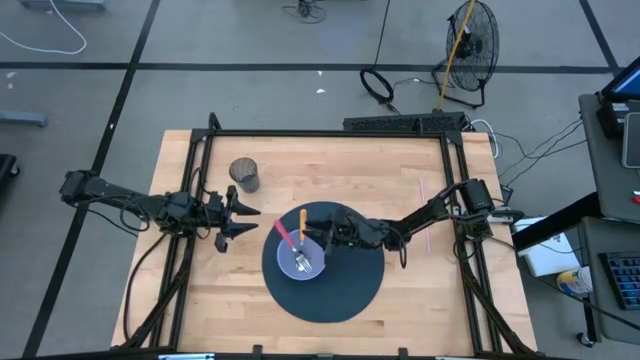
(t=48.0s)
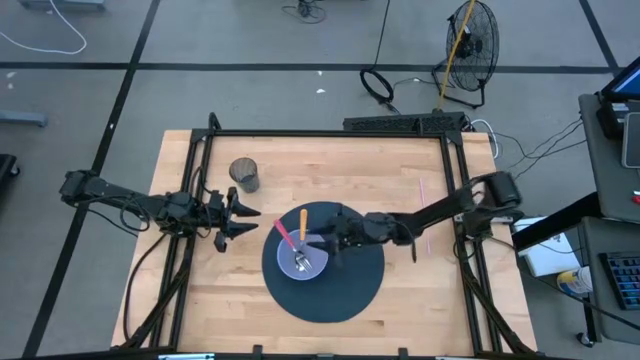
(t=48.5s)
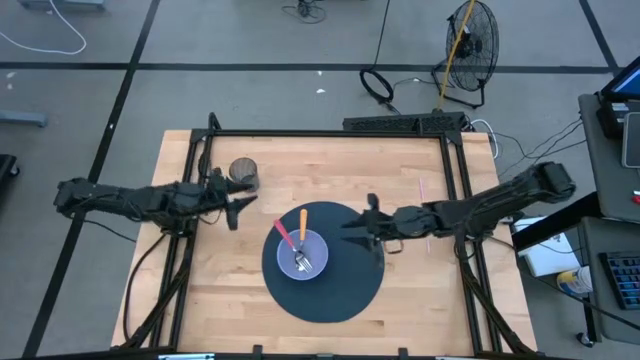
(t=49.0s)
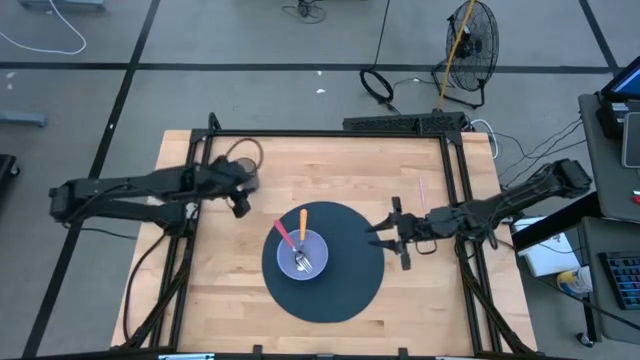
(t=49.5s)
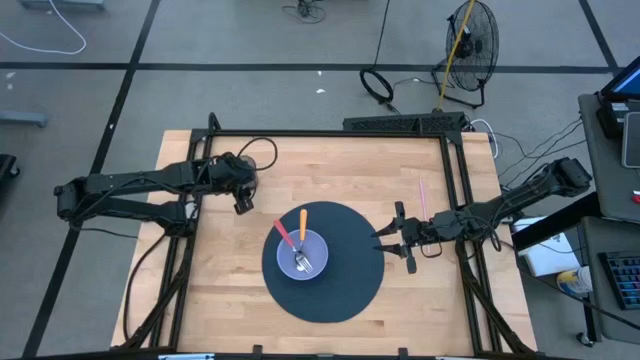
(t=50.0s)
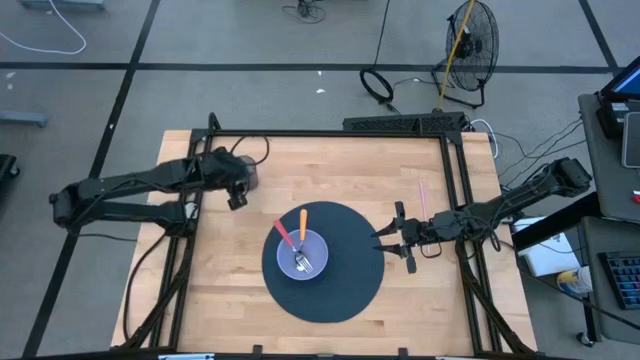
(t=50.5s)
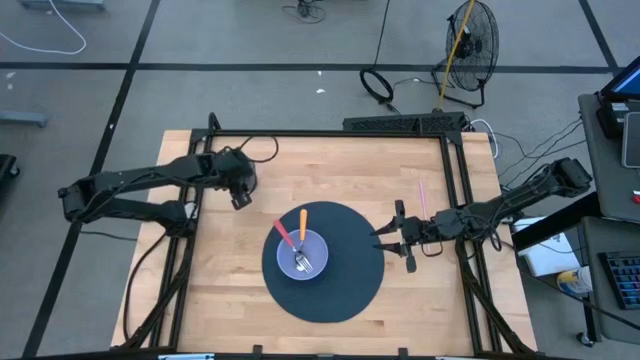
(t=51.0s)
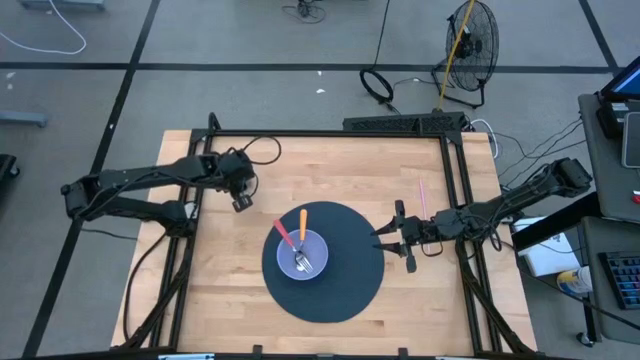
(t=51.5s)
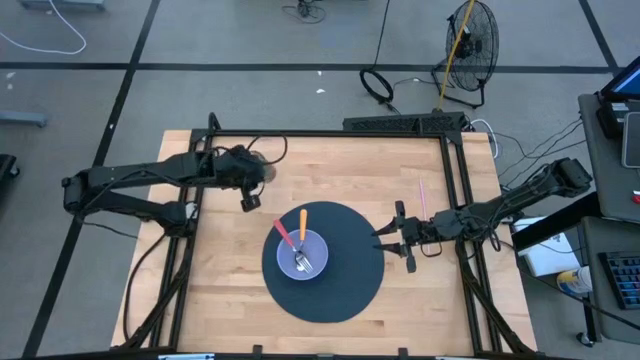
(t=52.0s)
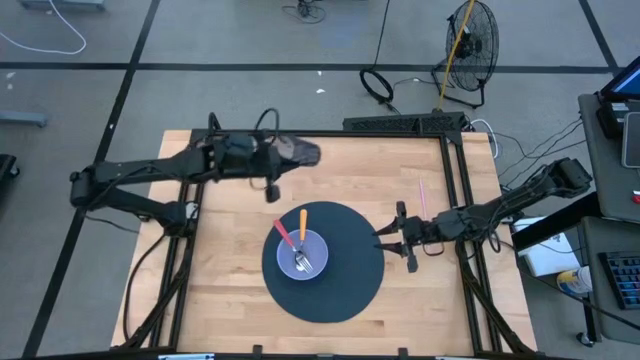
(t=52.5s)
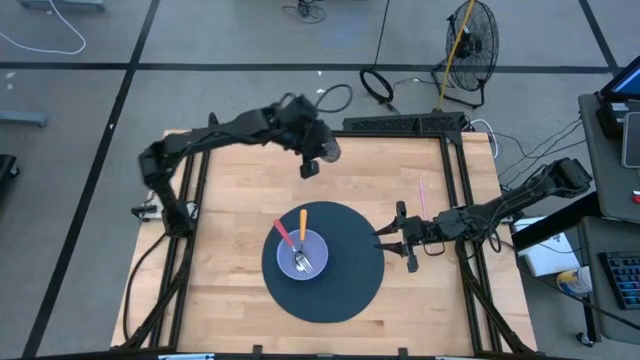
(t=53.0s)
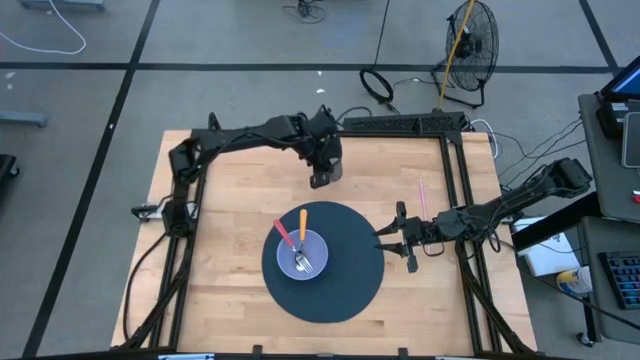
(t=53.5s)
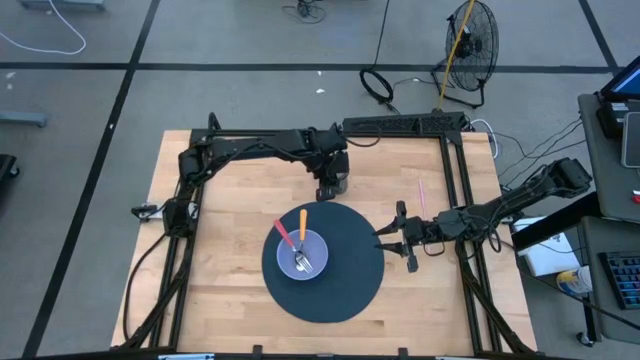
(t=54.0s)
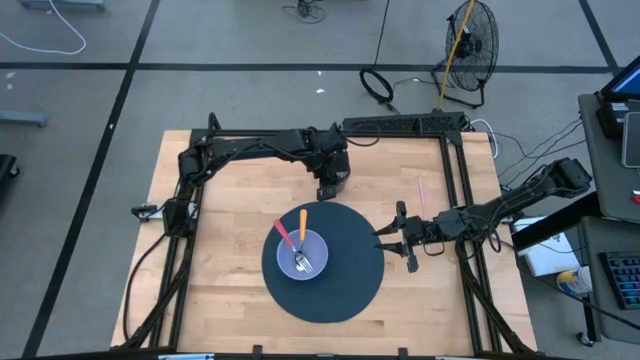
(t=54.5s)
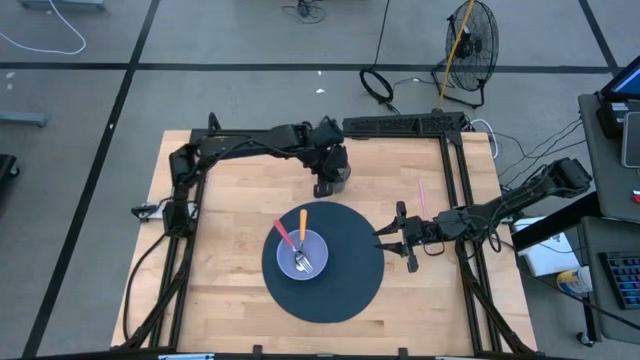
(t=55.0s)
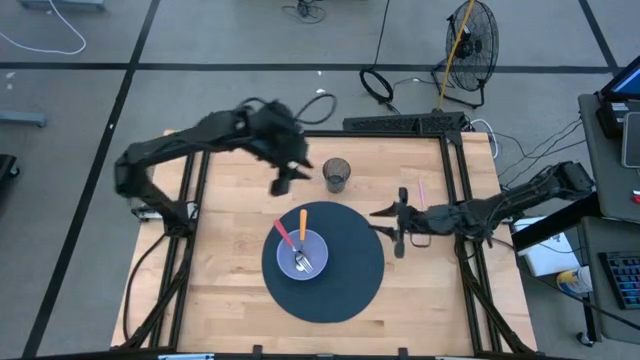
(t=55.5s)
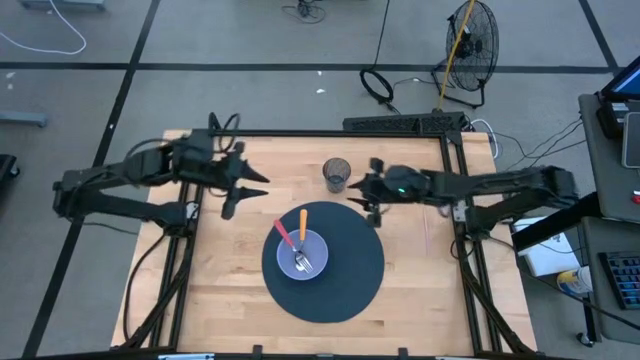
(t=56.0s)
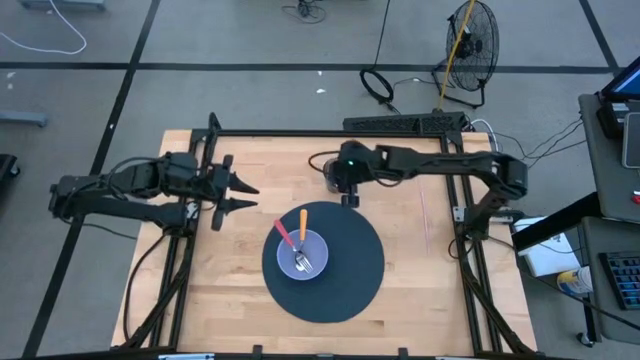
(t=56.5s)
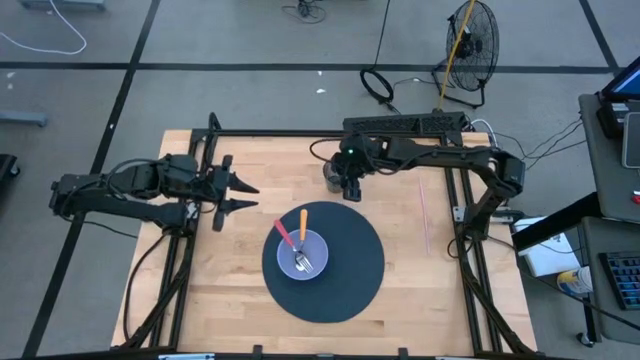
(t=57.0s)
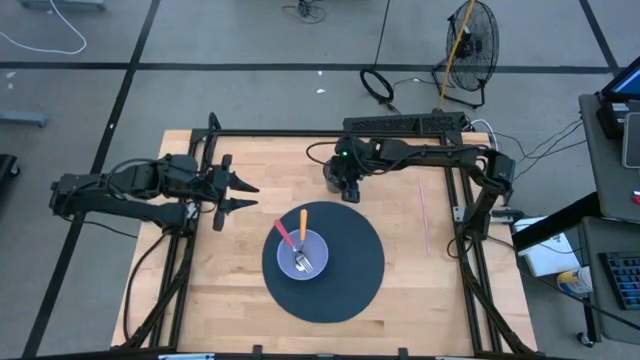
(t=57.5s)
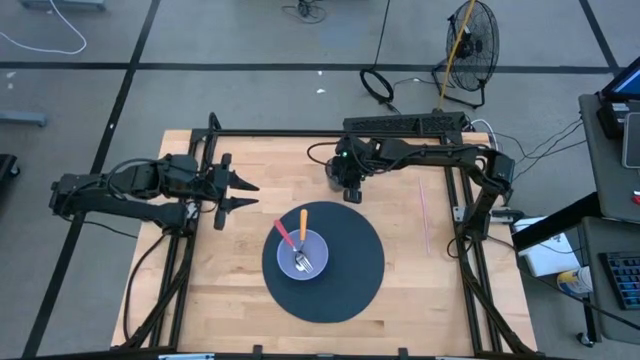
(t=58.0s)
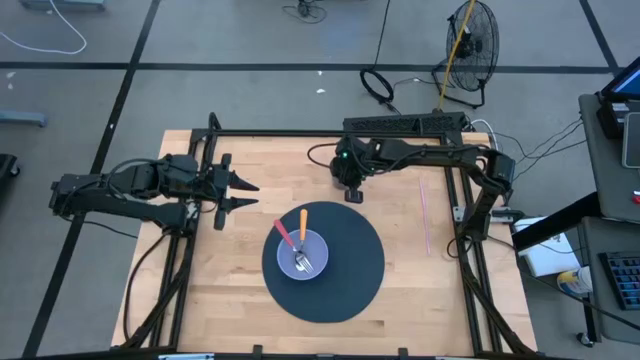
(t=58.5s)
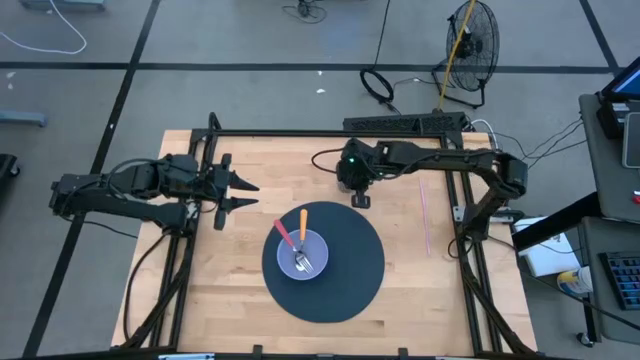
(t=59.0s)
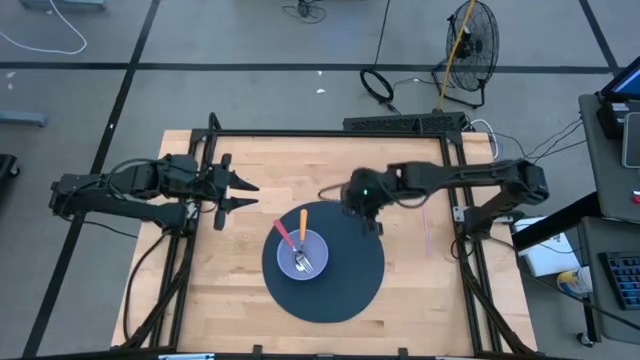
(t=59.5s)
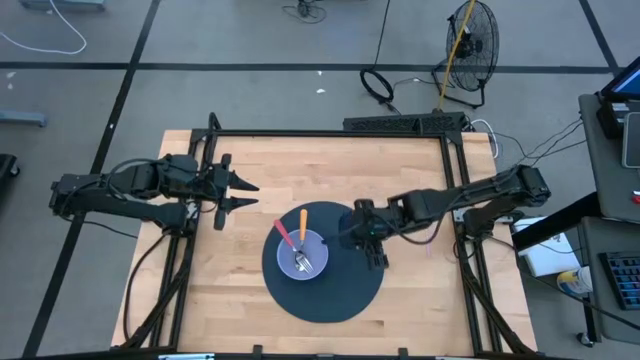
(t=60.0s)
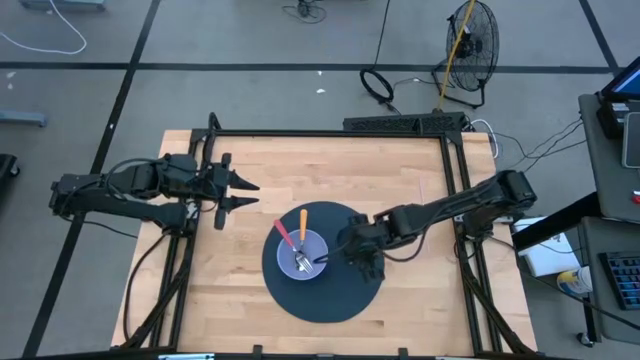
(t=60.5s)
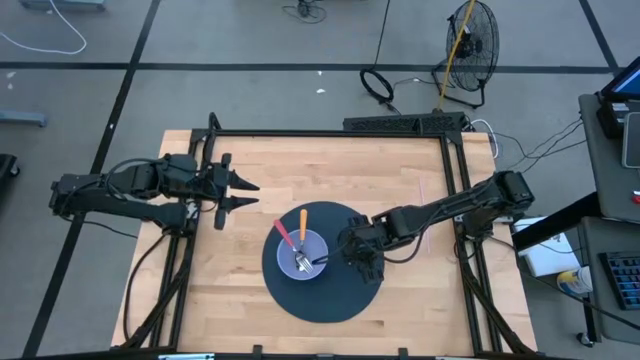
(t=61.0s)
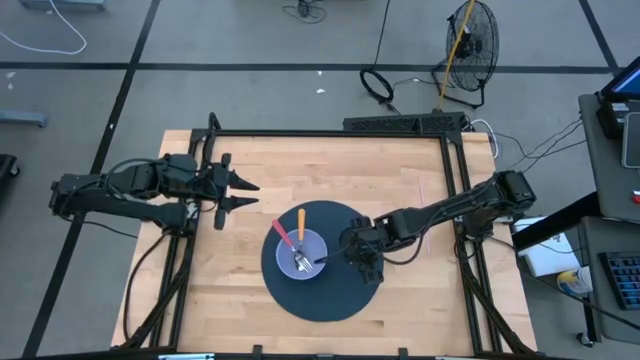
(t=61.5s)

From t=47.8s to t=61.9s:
Task: Pick & Place Utensil
Put the blue cup on the mat to the right of the purple bowl

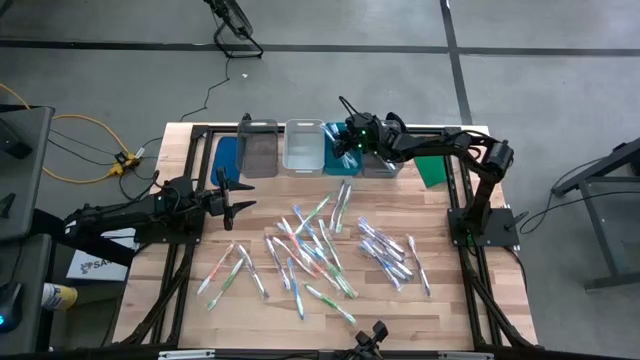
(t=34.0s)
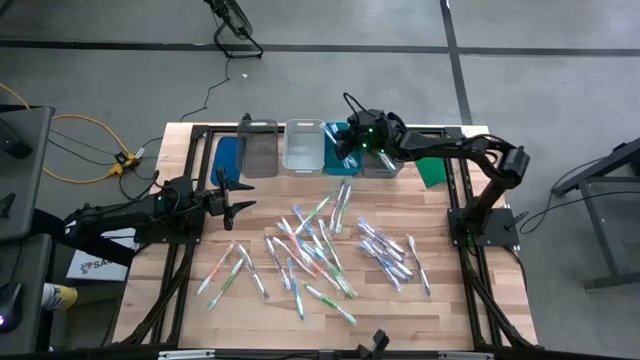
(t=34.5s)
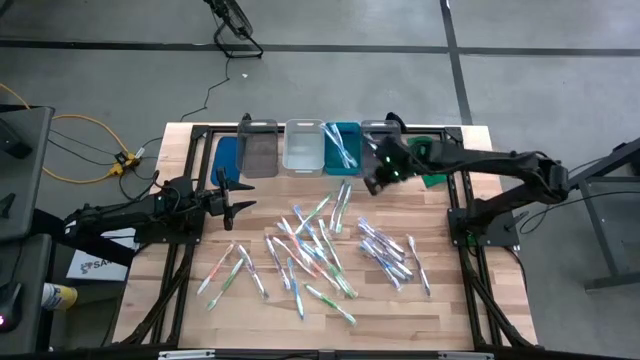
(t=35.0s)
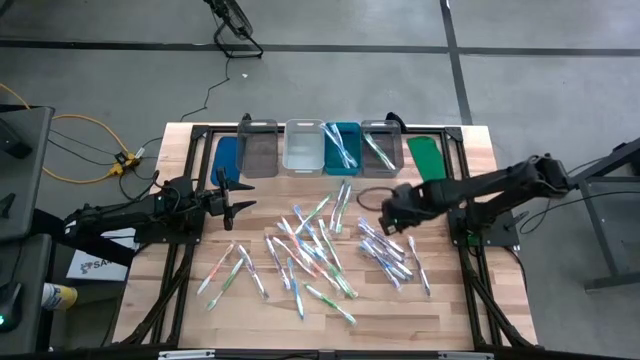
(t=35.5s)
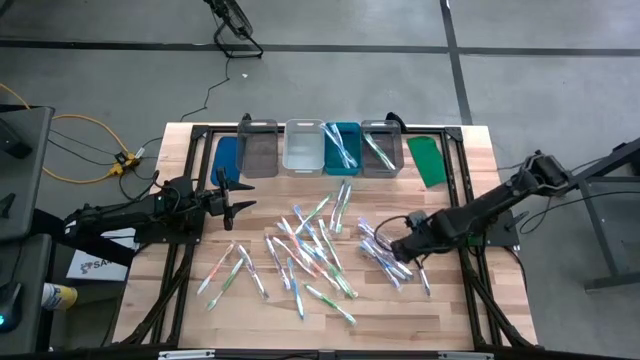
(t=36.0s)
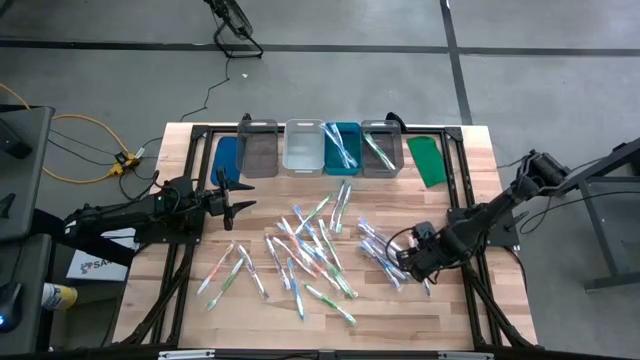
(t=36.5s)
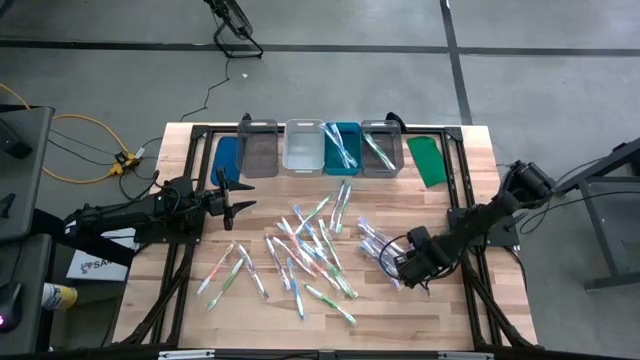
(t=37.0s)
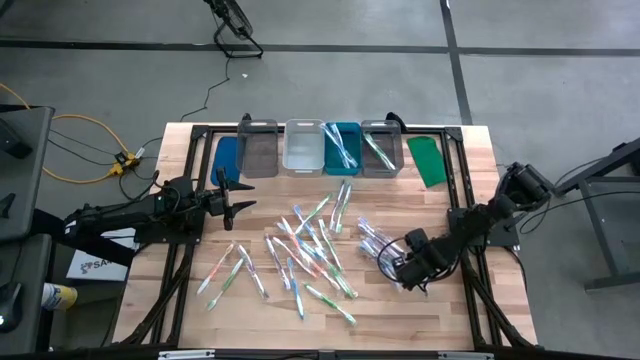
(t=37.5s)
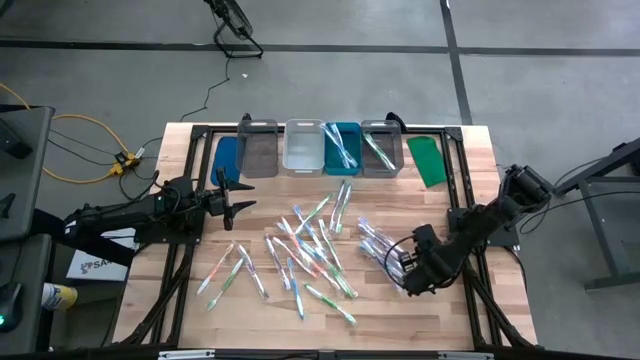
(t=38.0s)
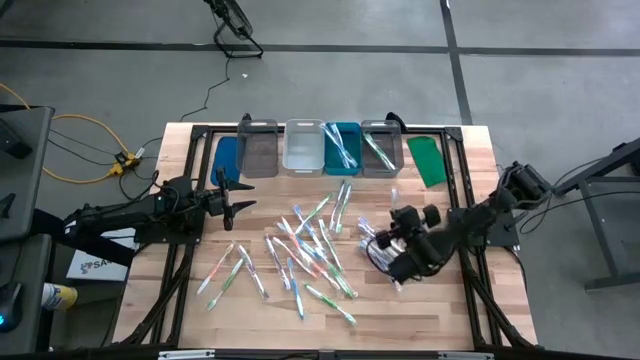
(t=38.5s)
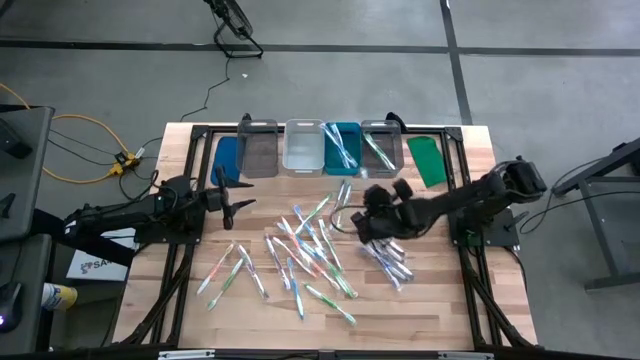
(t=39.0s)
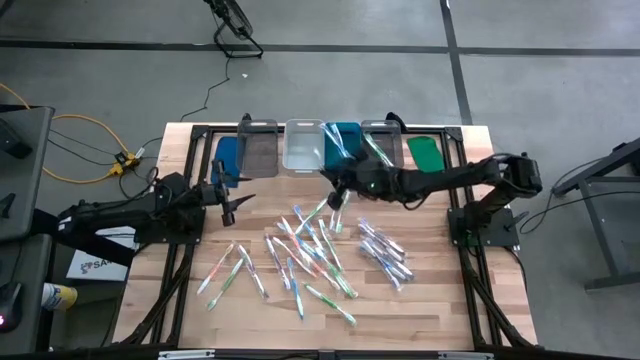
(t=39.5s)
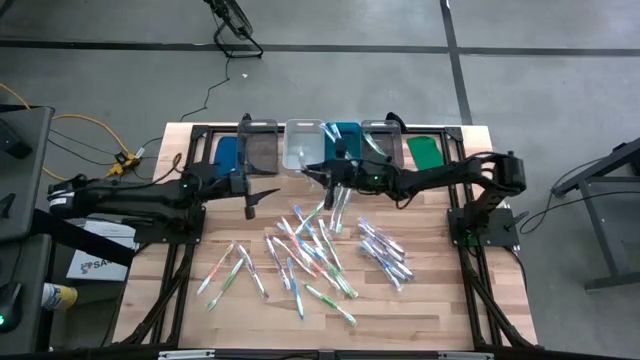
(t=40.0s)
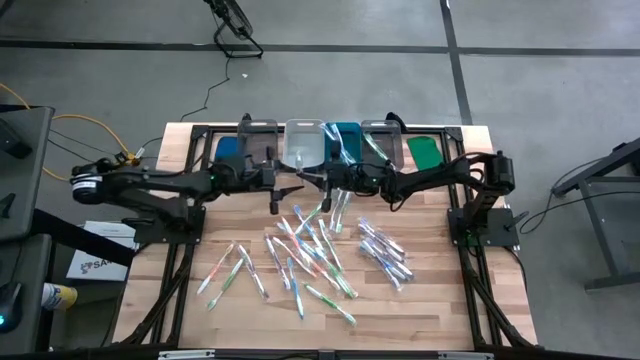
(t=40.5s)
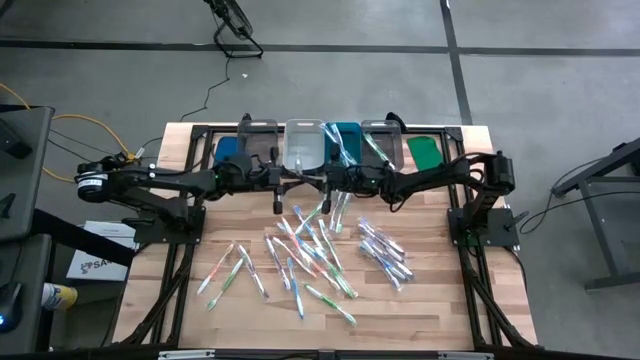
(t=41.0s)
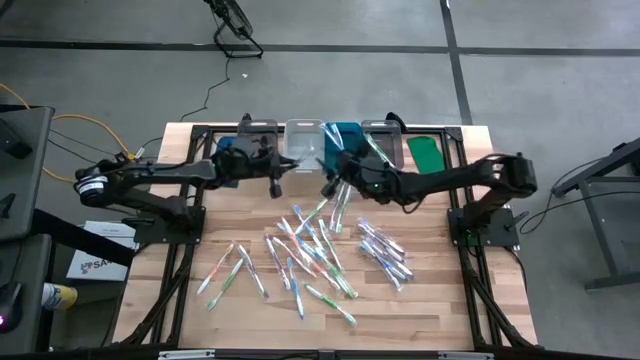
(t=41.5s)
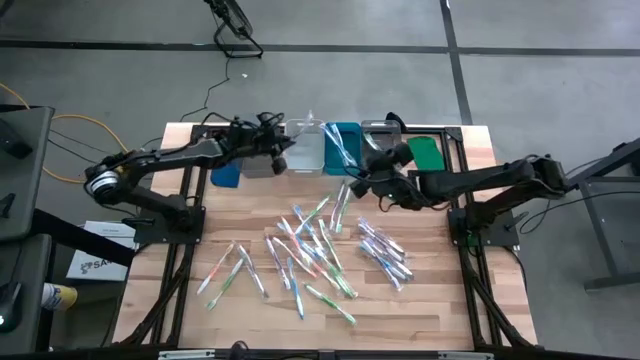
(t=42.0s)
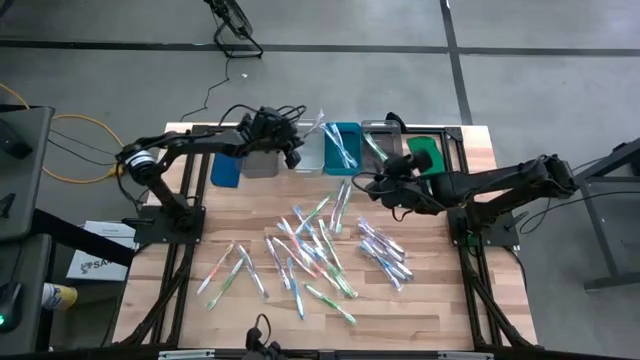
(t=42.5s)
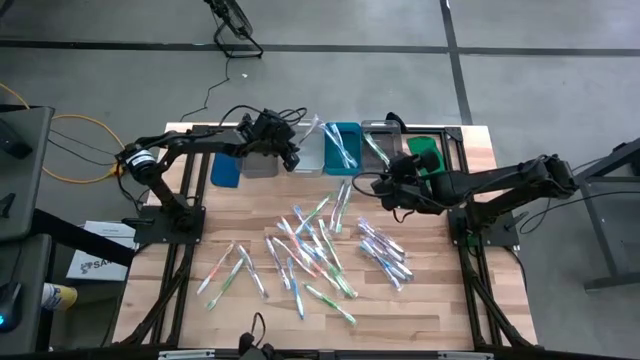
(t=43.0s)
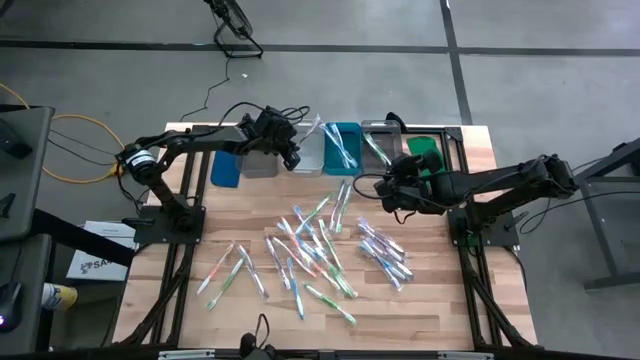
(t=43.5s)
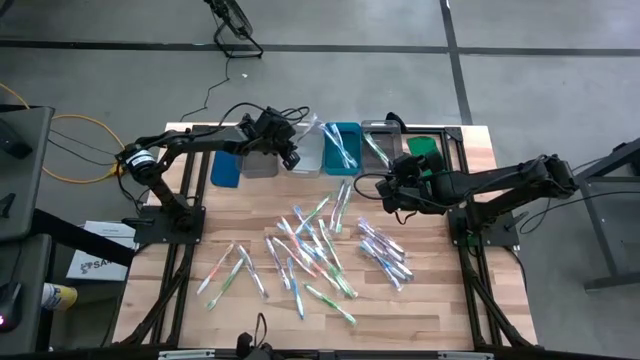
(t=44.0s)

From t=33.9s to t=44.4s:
Task: Pick & Place Toothbrushes
Put the violet toothbrush into the gray bin
